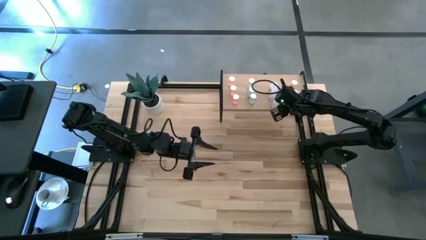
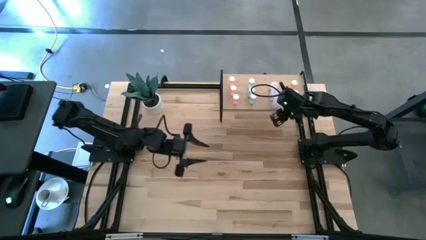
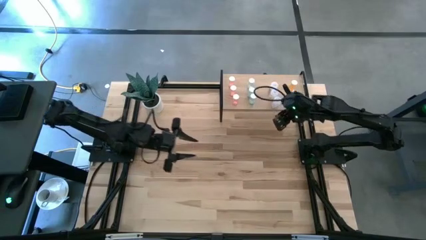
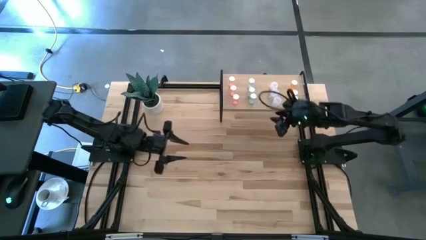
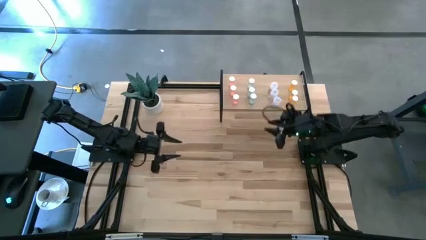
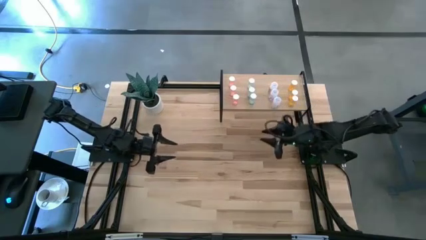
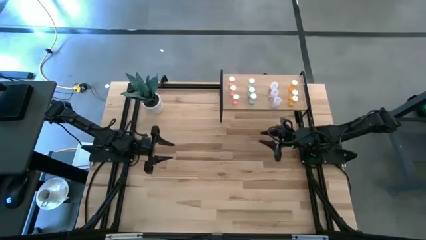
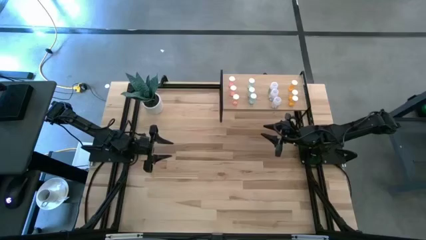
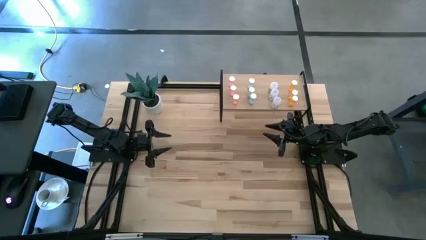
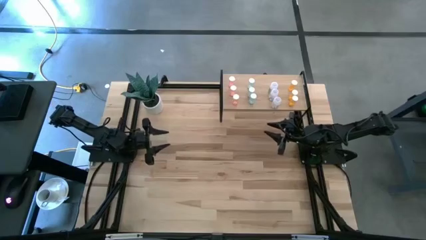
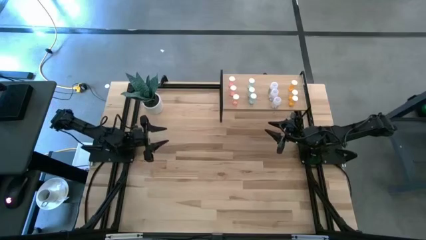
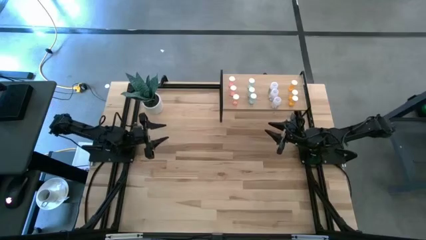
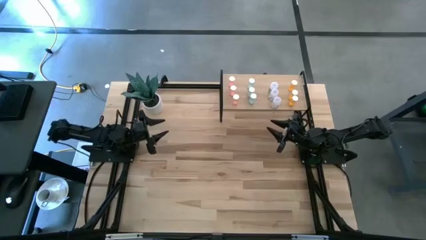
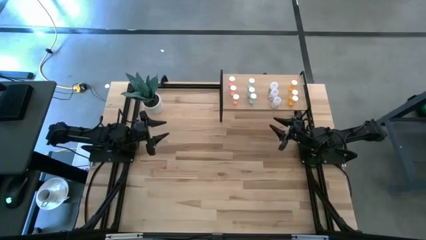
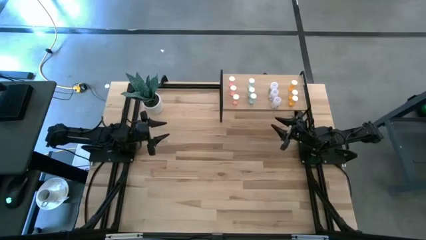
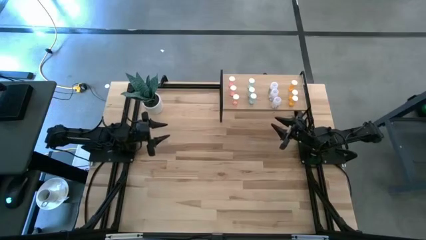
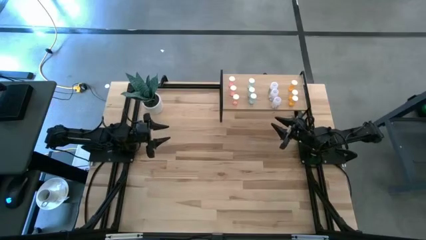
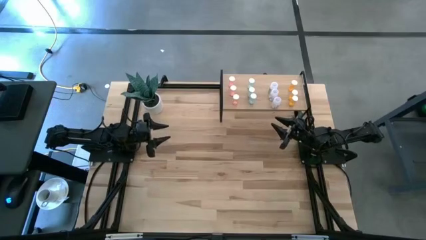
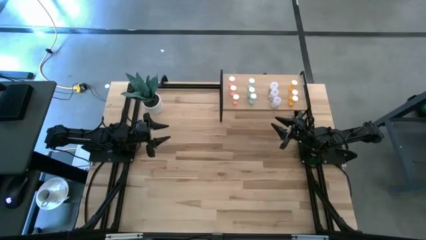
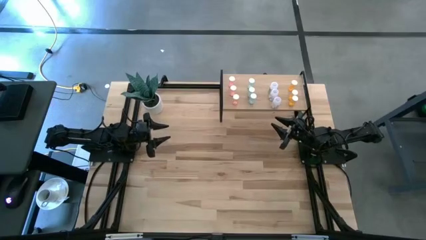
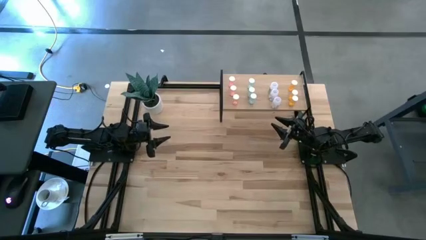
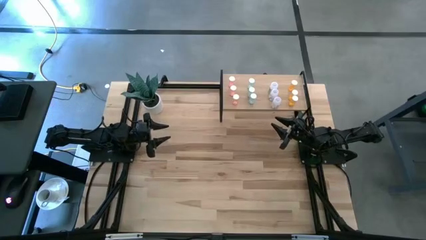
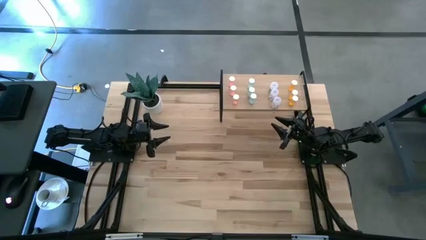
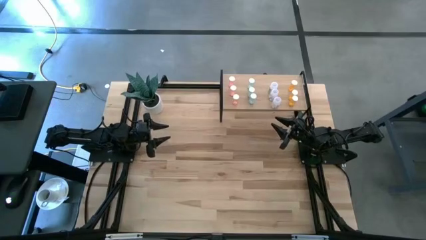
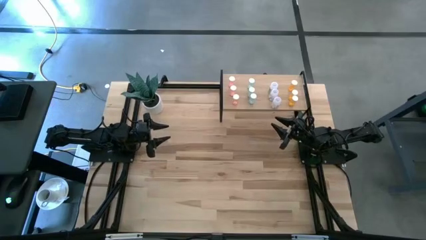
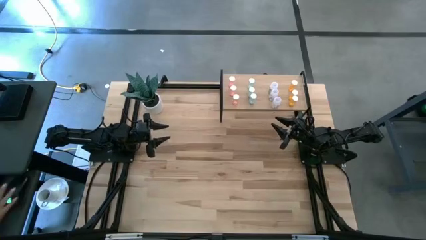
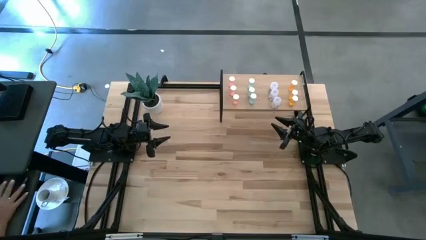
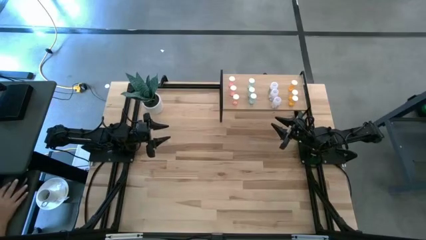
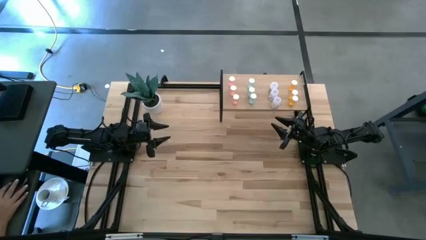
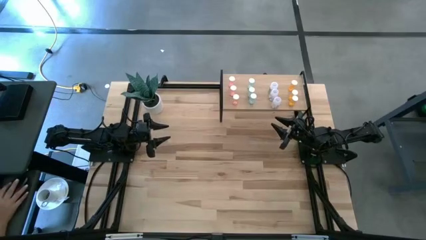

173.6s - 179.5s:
Task: Pick and place medicine bottles onto shelf by color
Return to Home Position

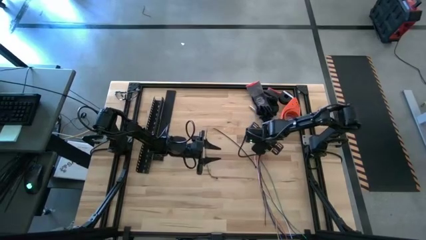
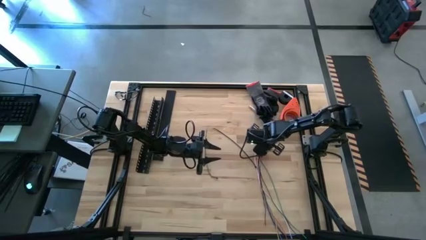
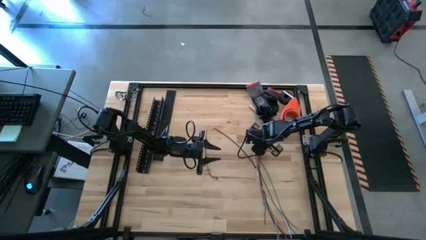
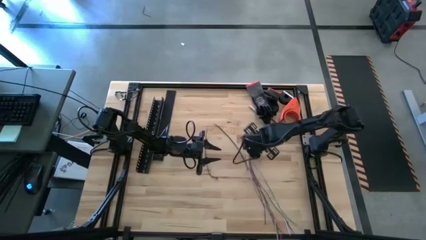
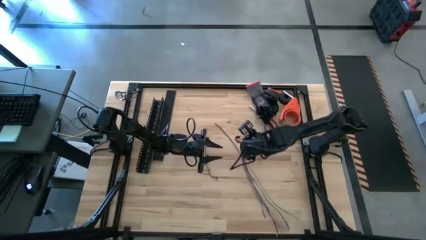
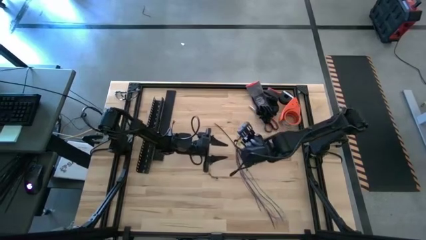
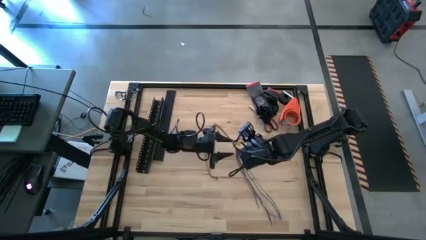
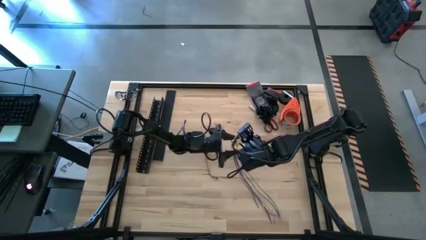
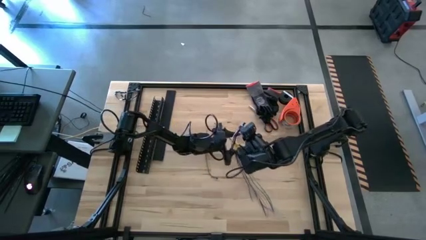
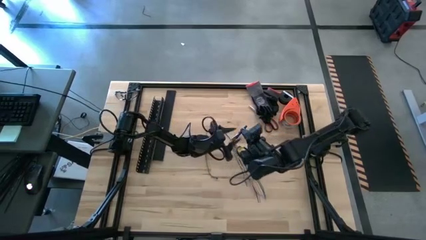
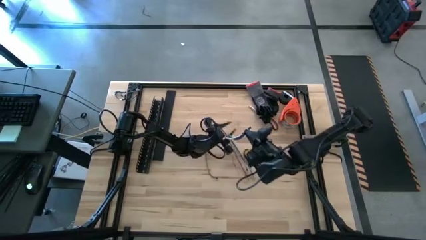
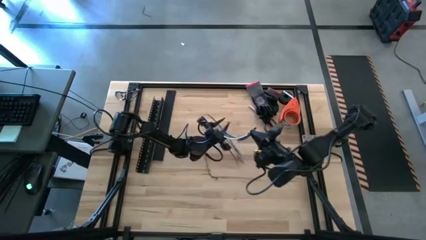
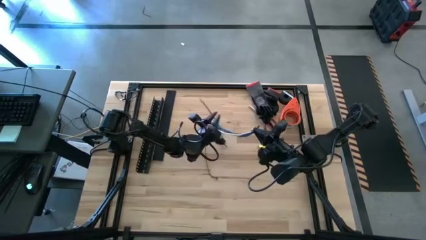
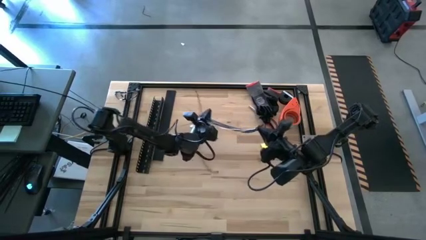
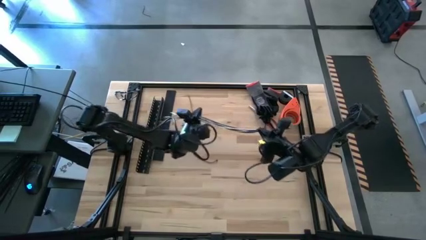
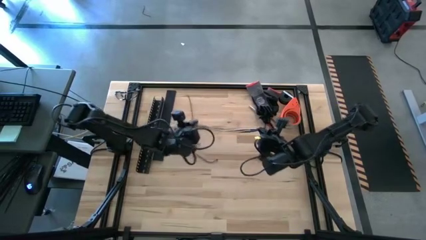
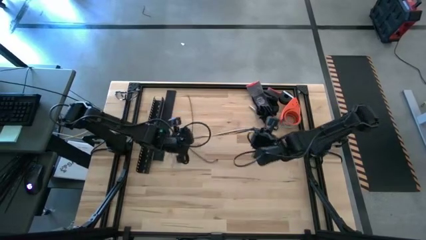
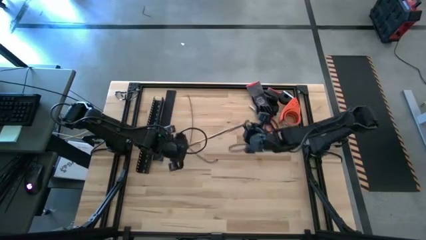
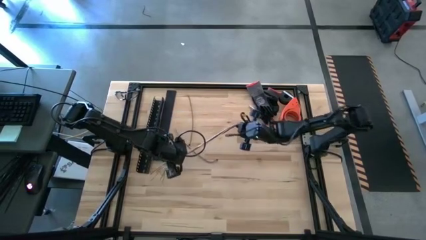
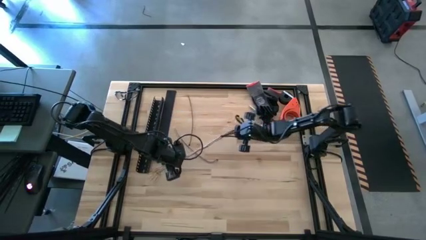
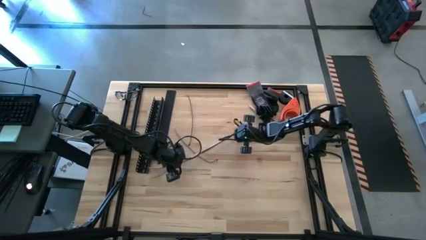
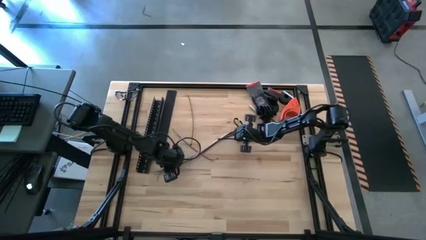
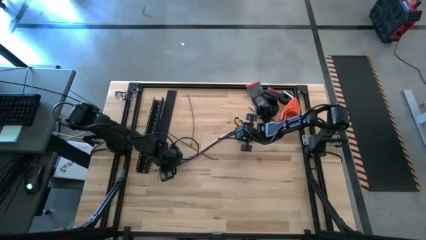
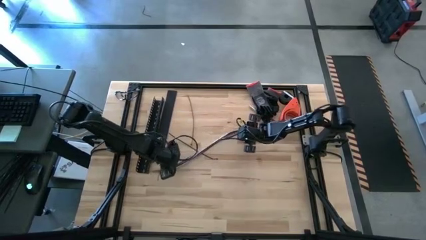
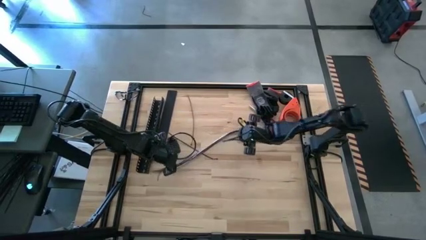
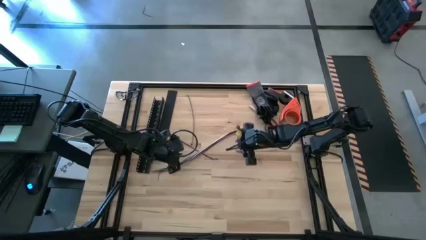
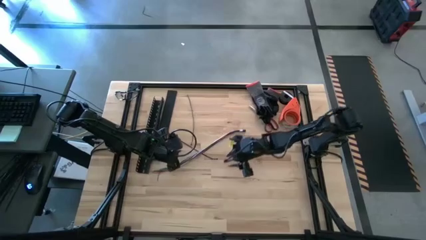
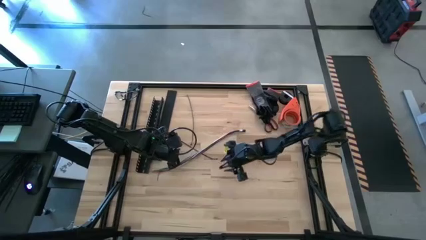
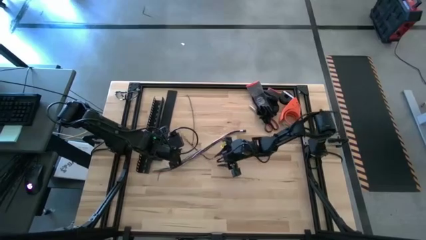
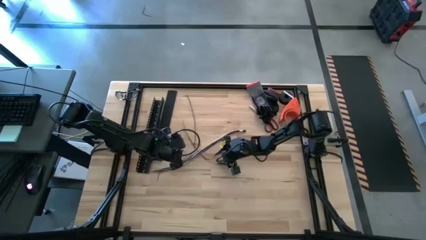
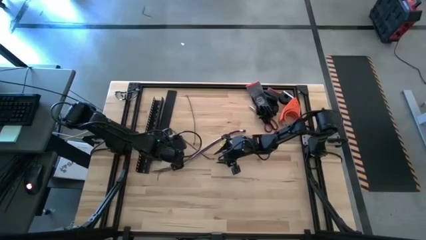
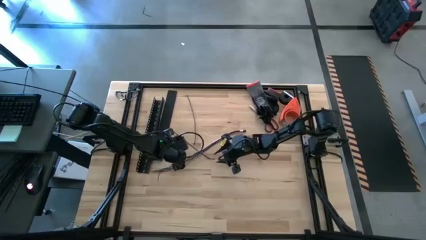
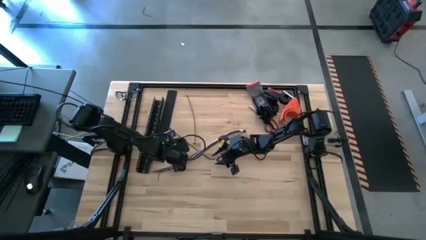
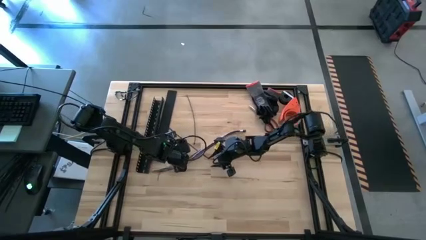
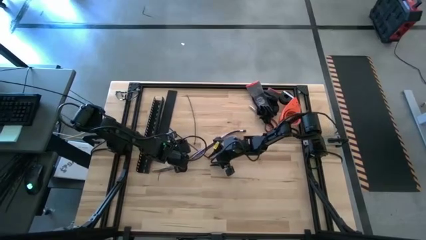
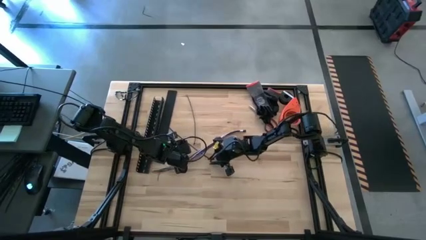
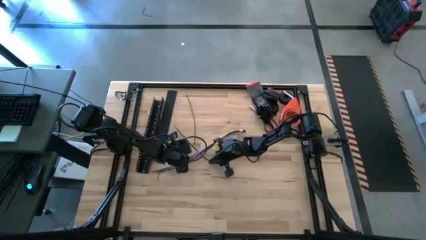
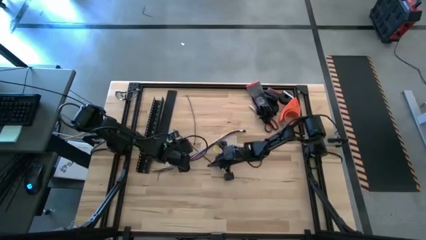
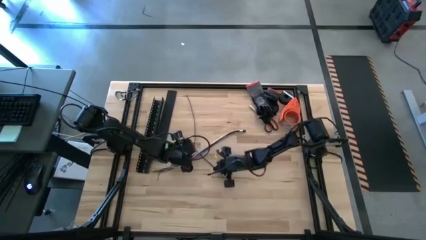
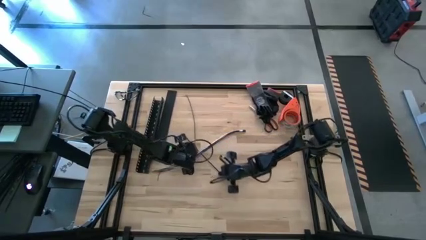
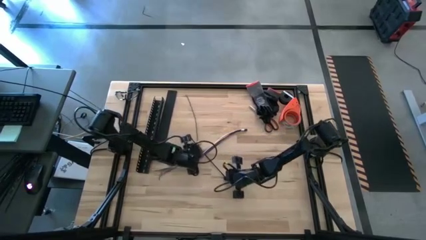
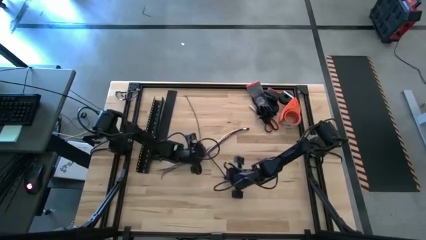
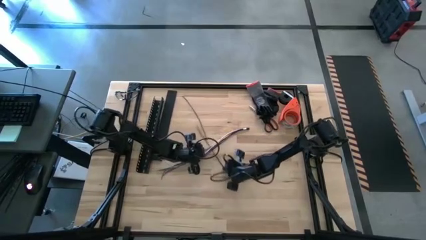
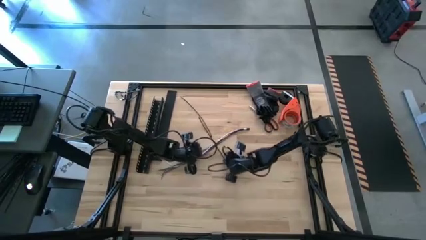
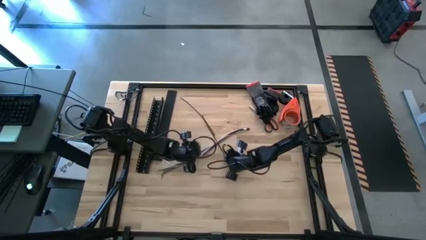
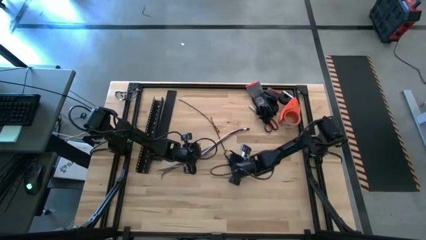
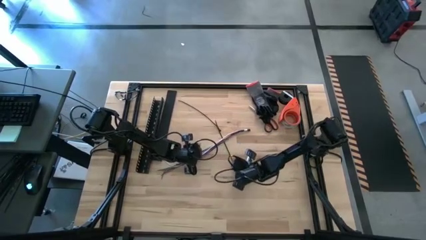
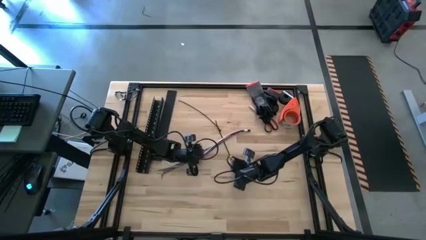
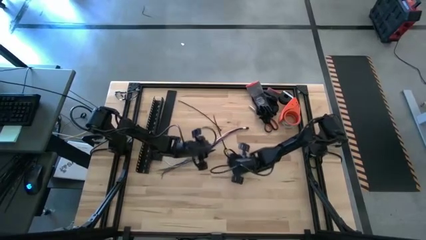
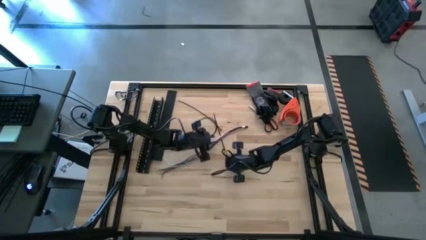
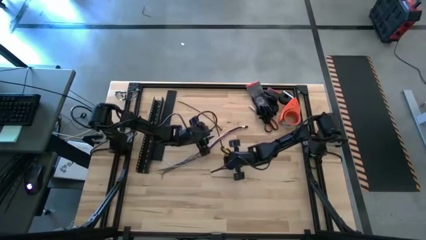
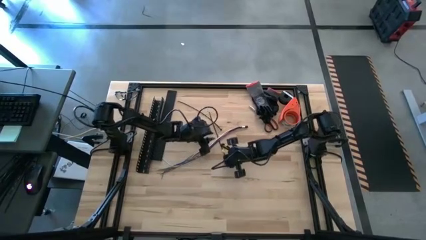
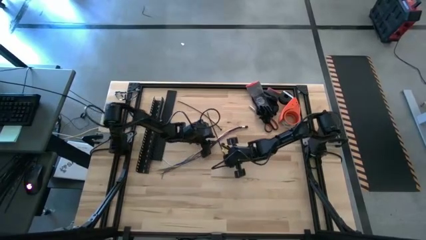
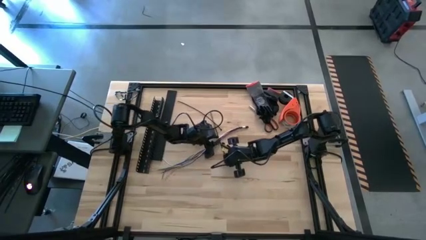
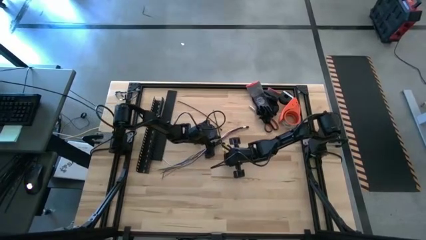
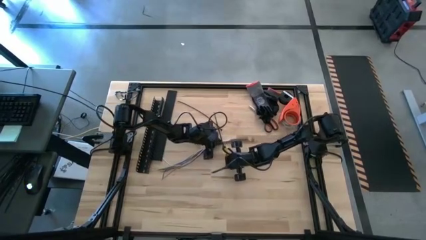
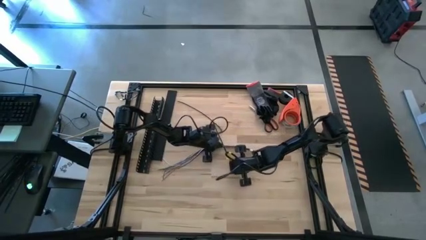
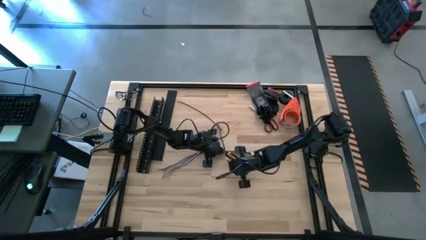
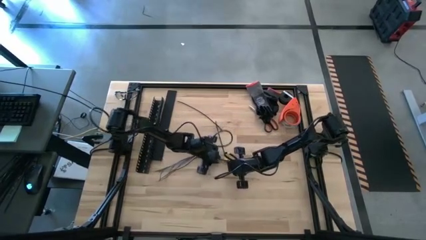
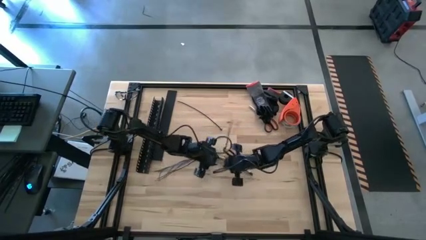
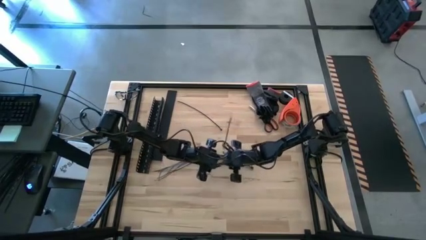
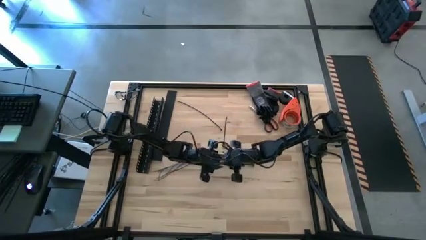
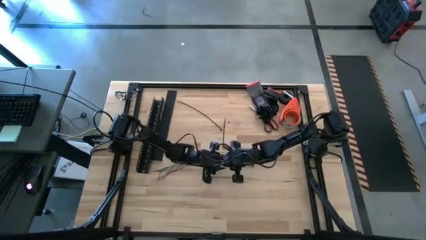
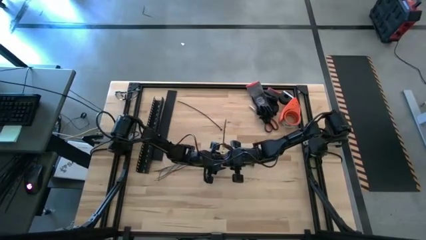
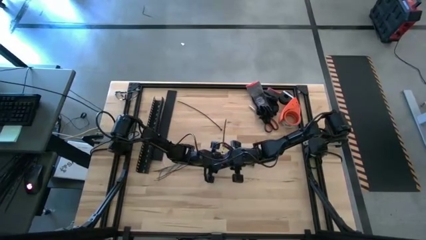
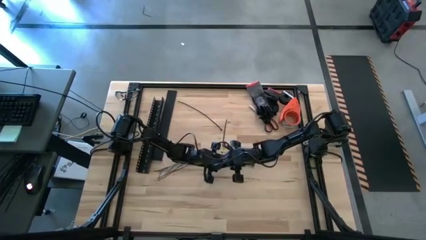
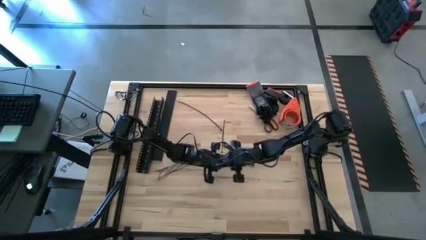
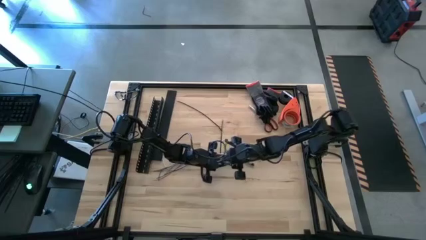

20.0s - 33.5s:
Task: Ziptie cables
Wrap the cables together using the left black zip tie
